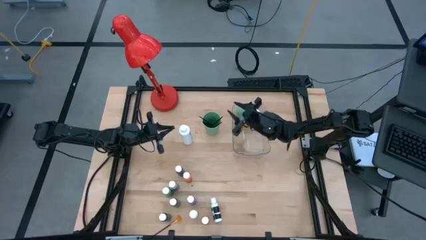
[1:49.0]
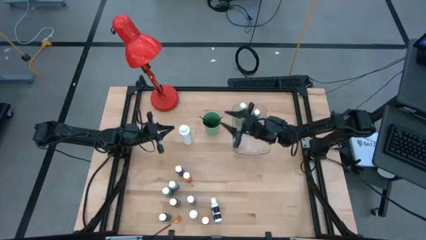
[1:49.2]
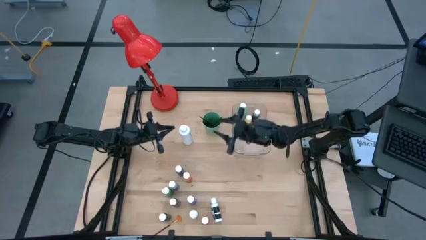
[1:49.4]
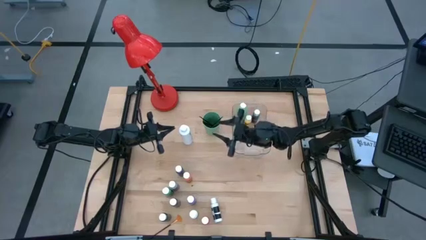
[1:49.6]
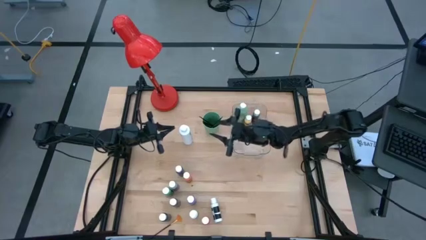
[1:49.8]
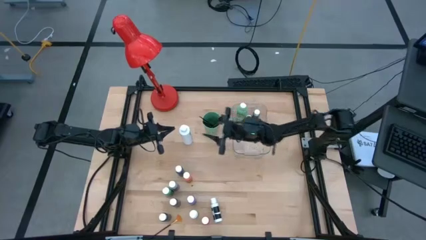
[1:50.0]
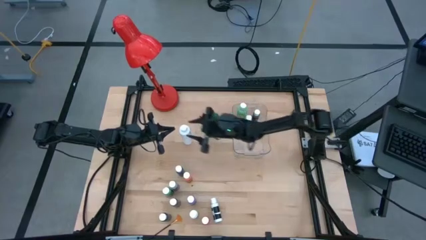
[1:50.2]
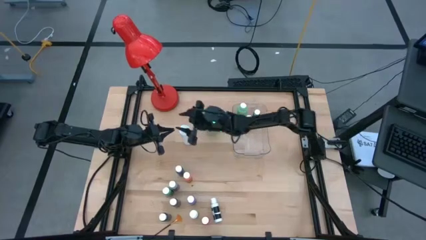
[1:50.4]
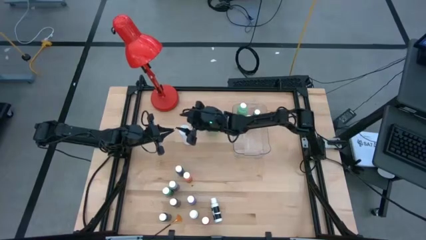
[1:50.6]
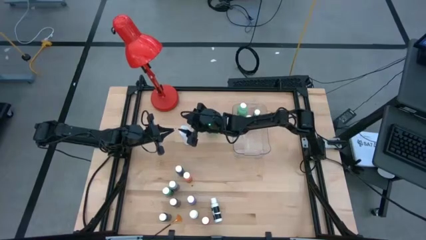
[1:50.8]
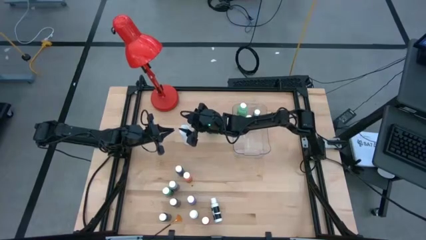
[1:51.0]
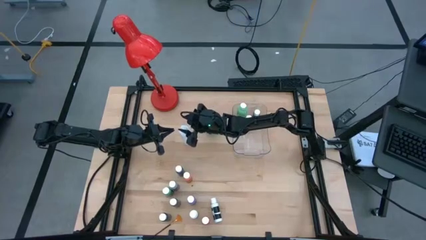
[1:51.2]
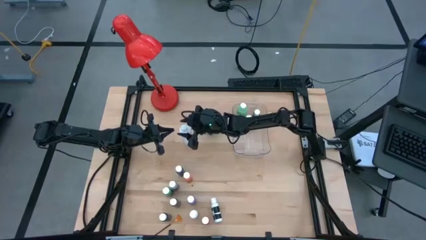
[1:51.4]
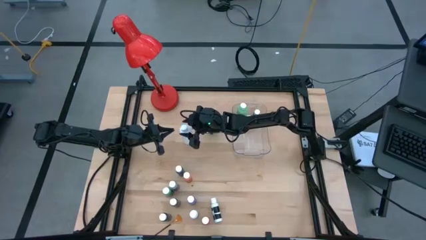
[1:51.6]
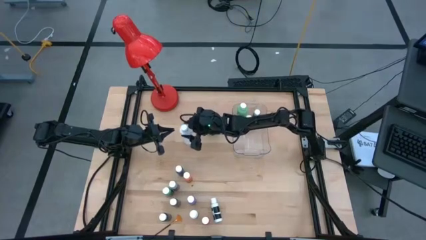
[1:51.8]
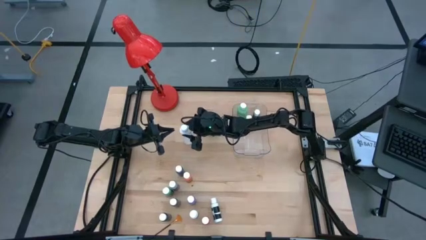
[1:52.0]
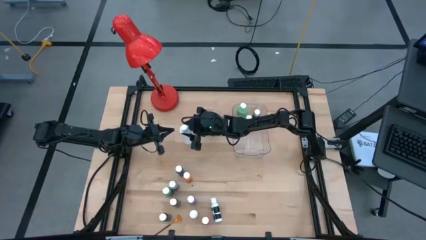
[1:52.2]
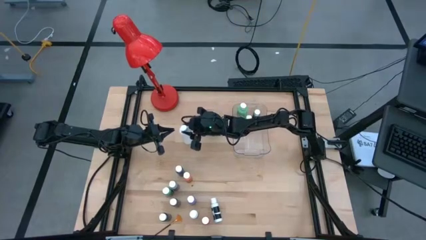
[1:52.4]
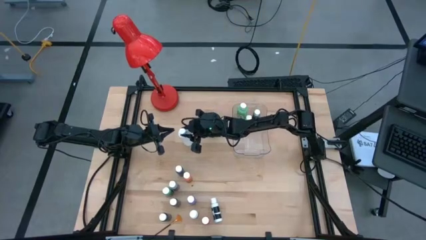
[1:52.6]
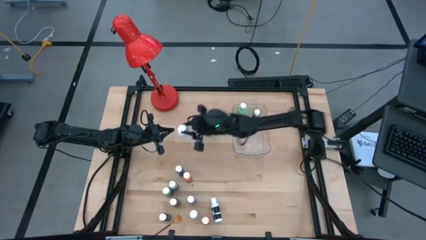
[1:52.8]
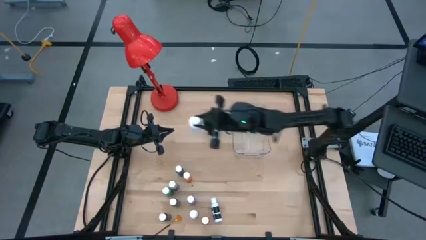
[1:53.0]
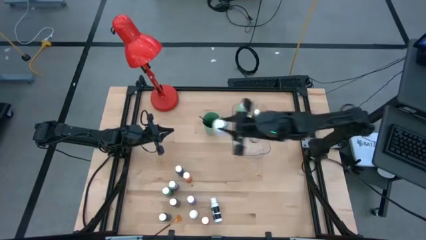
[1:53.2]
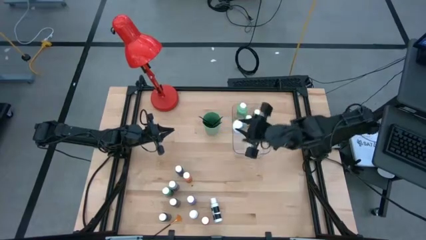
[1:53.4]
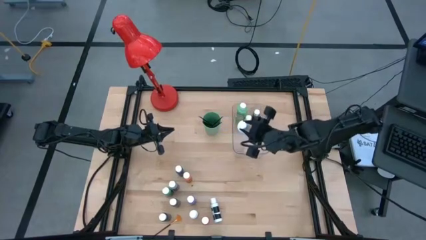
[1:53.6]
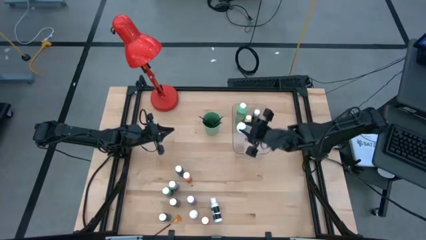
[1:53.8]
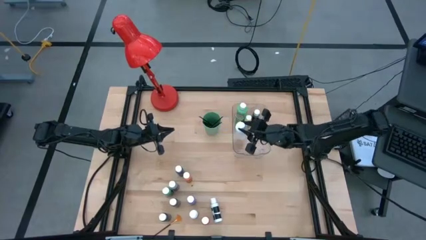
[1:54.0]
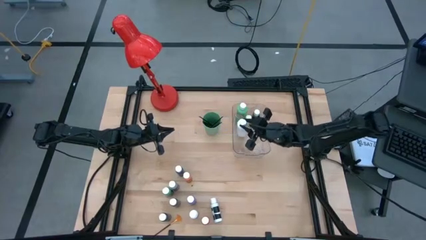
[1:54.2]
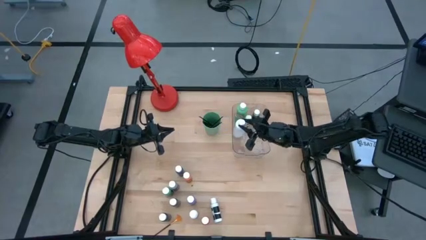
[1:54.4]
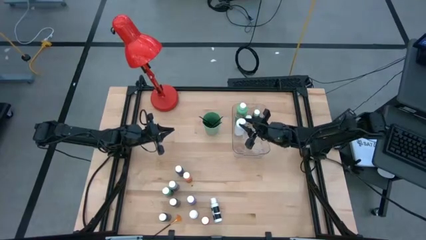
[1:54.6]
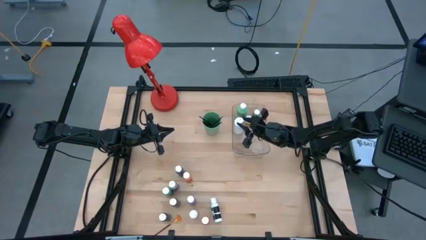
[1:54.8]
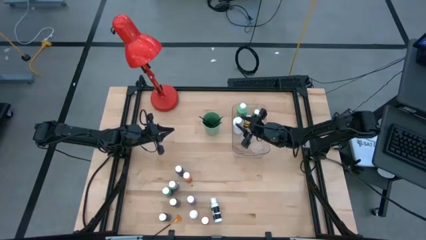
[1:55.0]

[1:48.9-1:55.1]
Task: Pick & Place Paint Supplies
Put the white paint bottle into the transparent bin

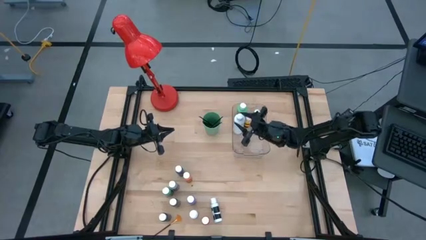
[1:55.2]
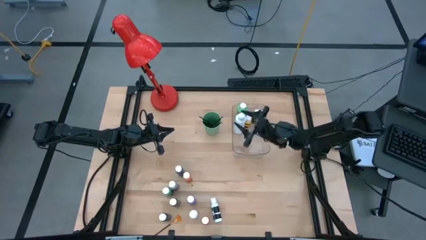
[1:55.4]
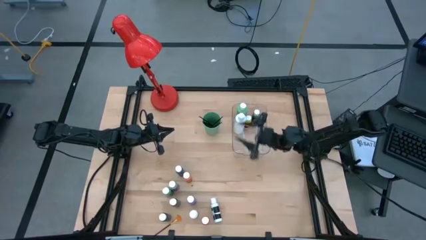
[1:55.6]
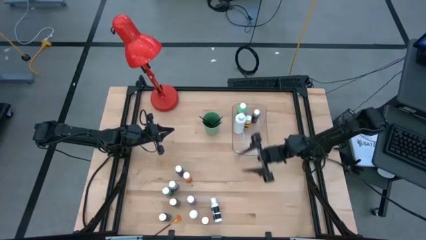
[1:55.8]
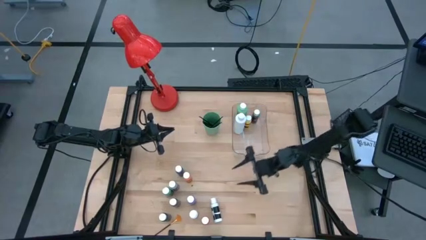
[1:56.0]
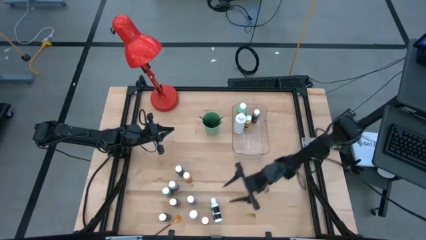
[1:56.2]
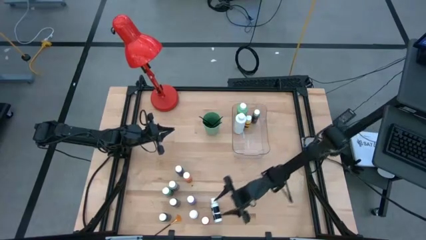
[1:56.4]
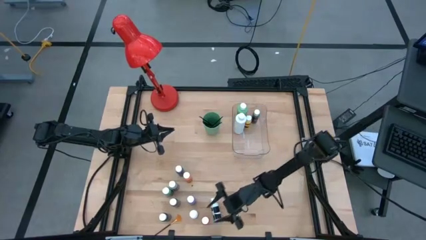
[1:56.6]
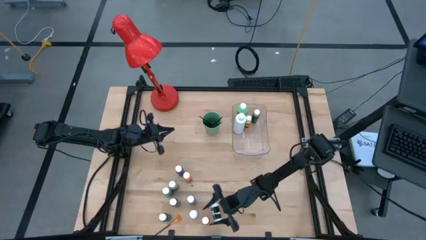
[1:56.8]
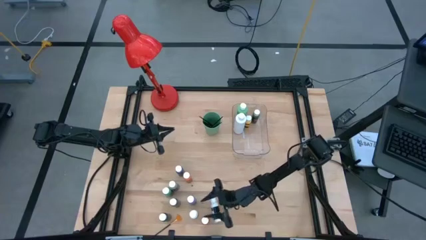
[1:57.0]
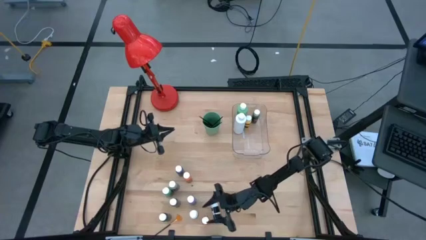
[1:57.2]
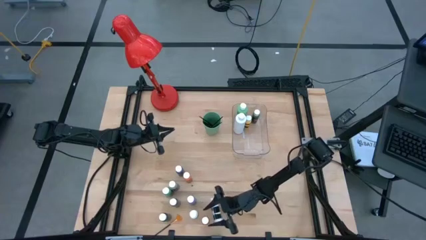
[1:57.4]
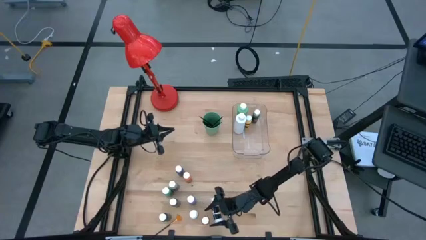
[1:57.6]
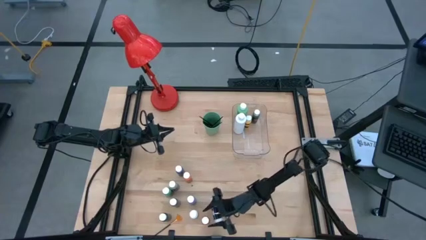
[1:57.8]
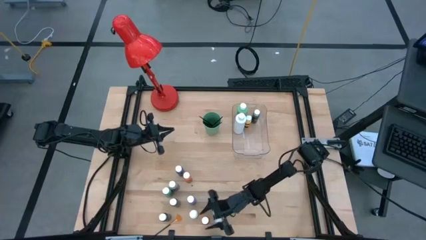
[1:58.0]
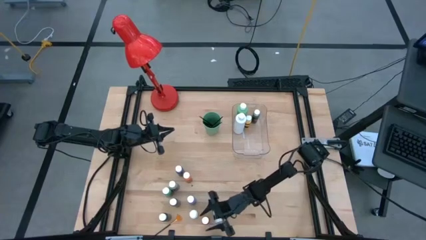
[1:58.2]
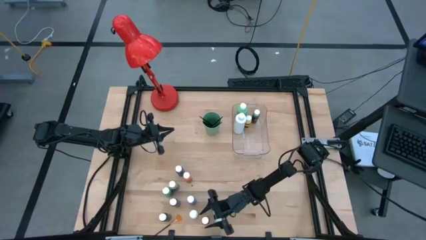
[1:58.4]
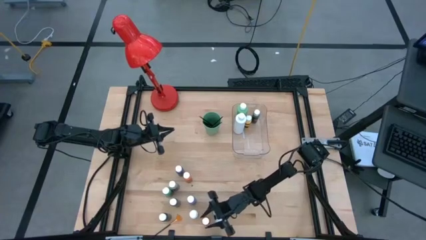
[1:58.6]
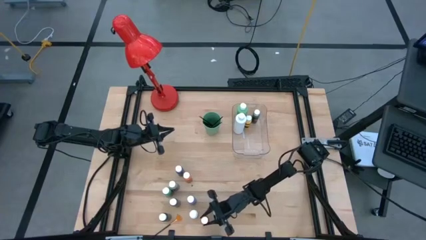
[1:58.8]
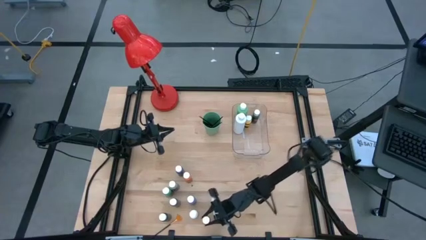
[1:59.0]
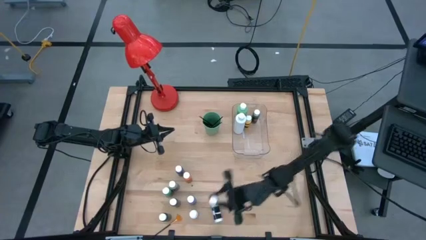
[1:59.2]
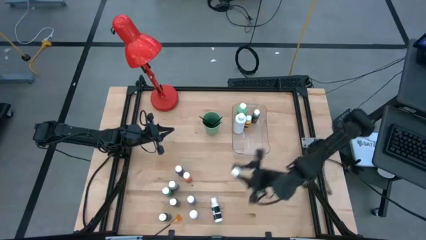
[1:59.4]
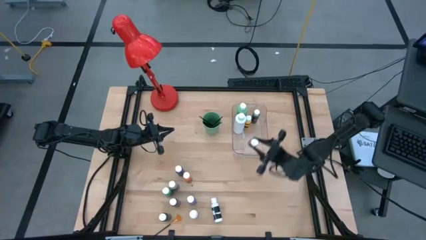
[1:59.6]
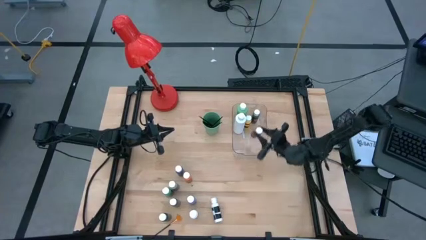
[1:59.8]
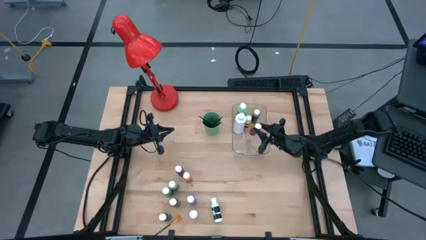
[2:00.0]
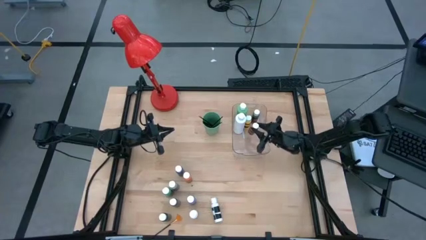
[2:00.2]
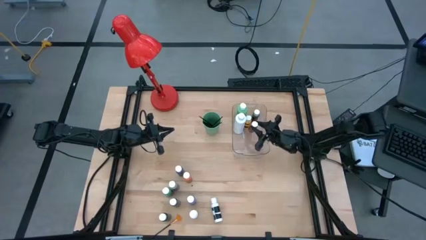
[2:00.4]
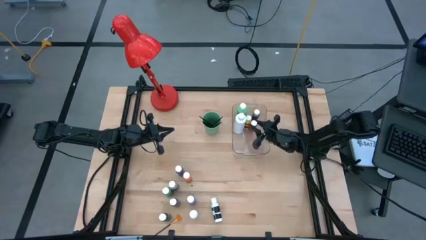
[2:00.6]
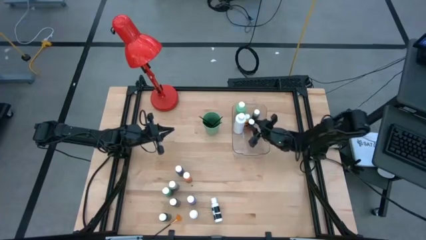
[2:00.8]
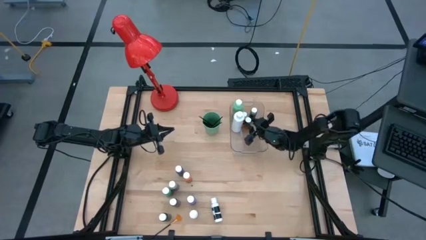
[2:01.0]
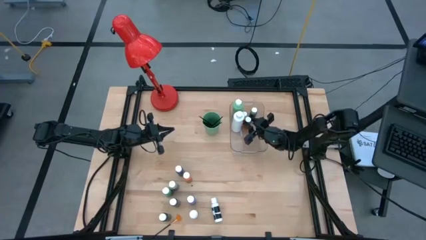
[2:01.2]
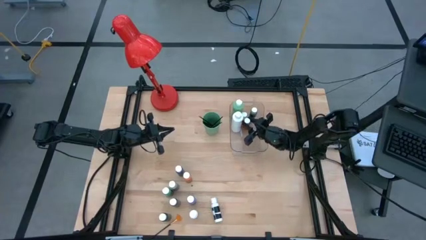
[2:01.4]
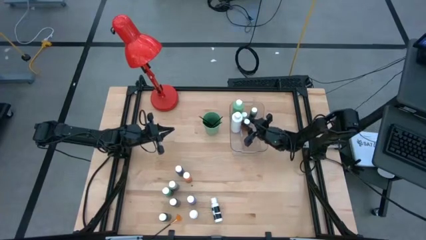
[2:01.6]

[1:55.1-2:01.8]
Put the orange paint bottle into the transparent bin
